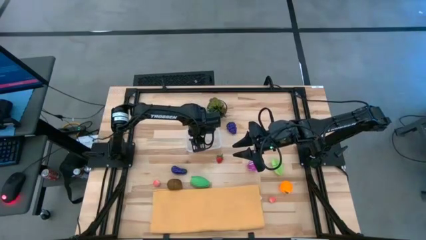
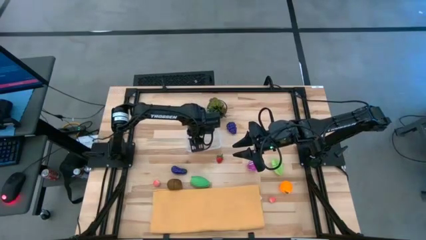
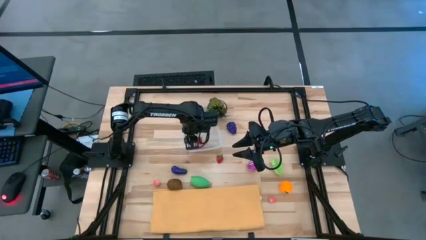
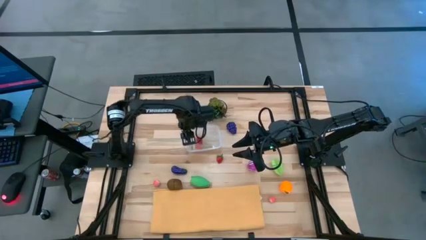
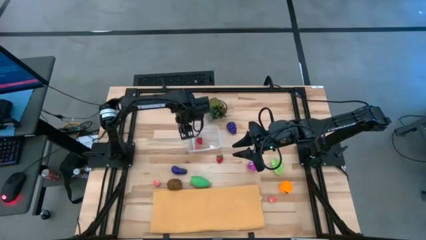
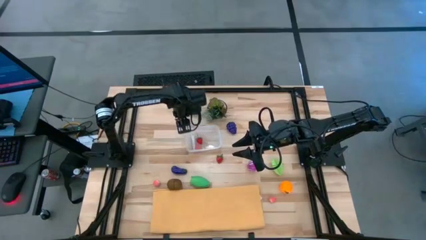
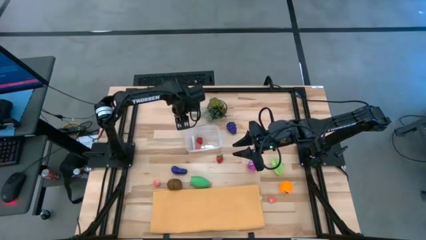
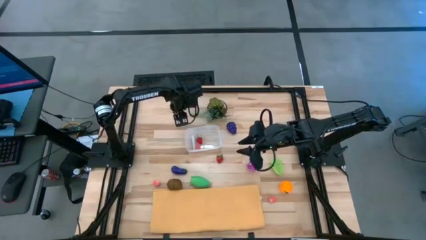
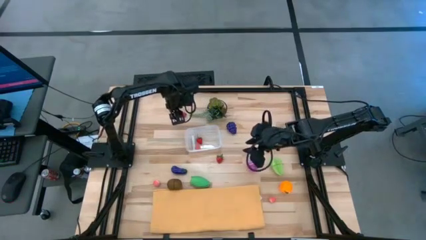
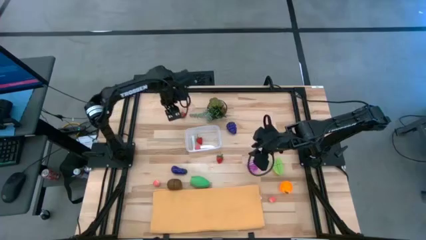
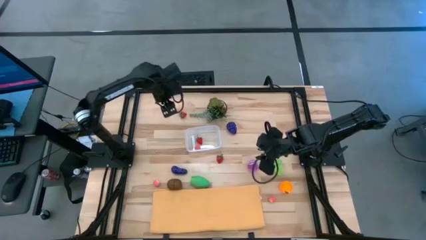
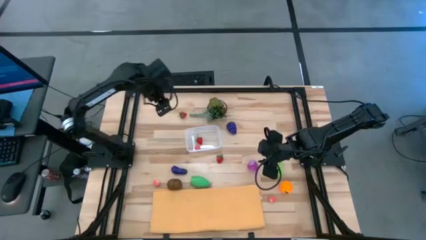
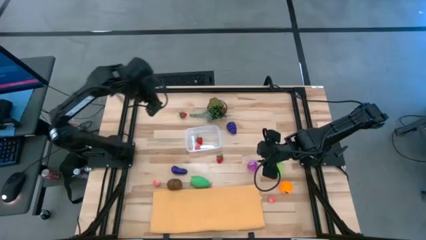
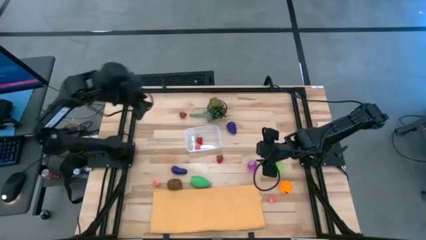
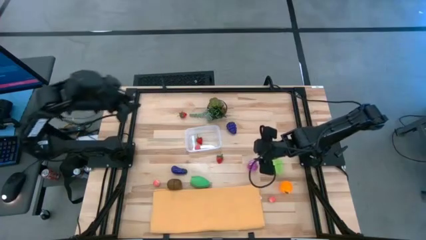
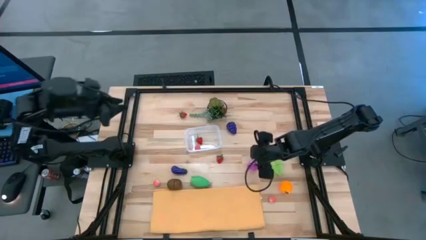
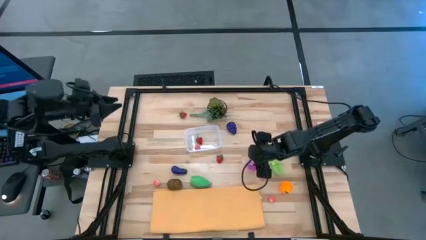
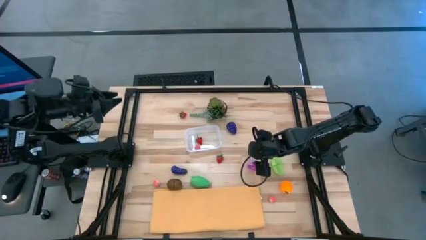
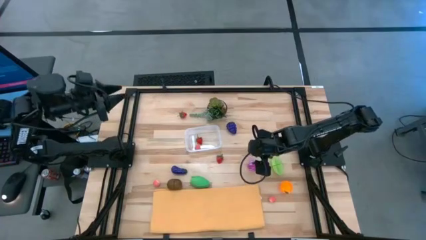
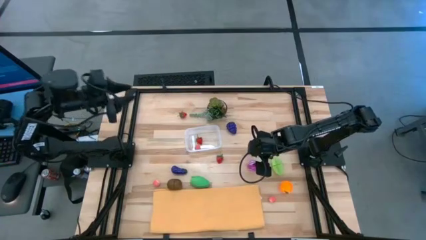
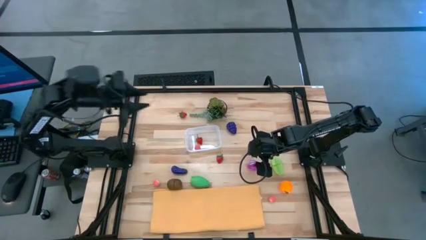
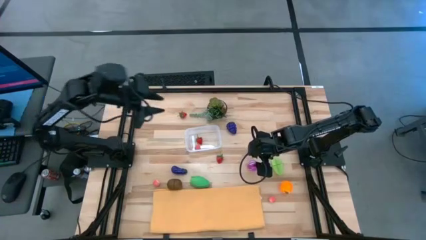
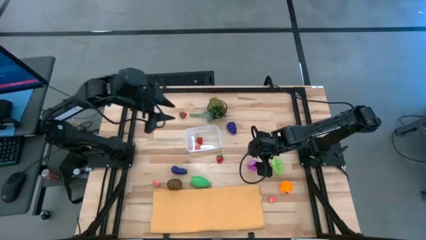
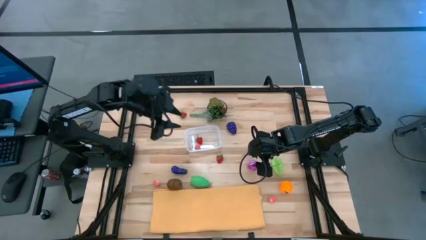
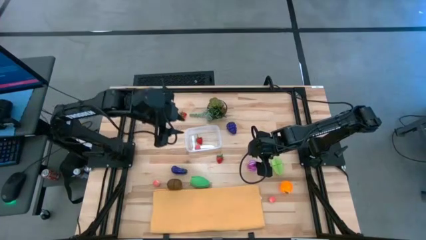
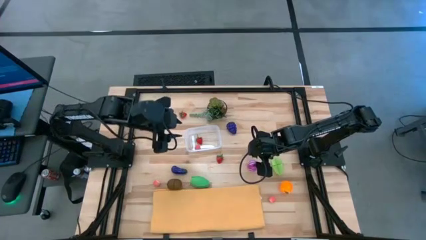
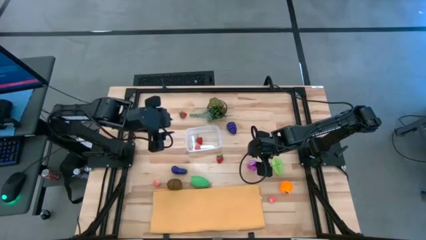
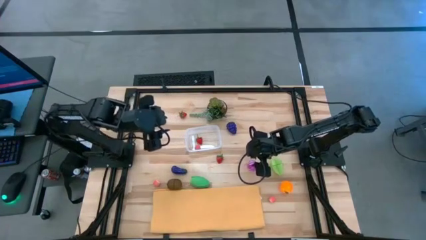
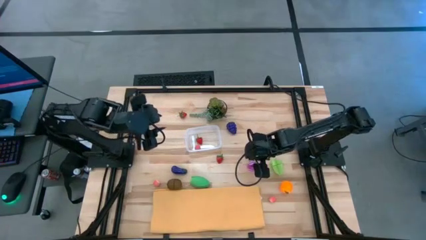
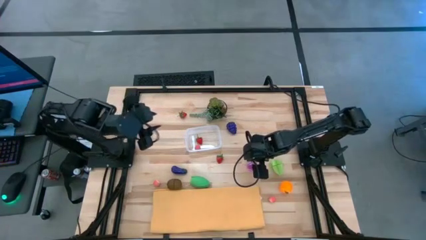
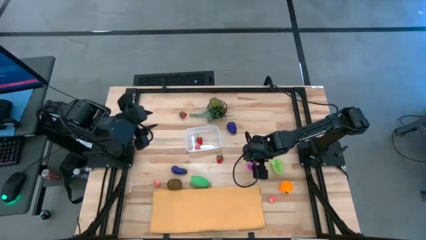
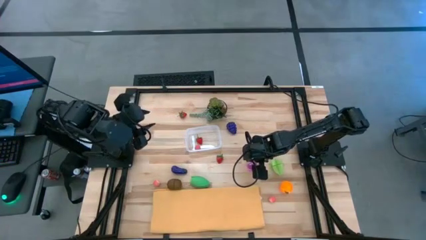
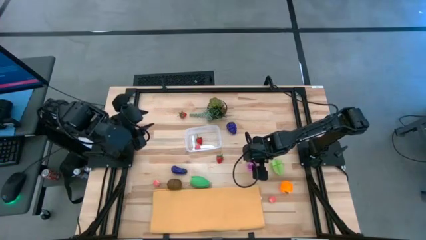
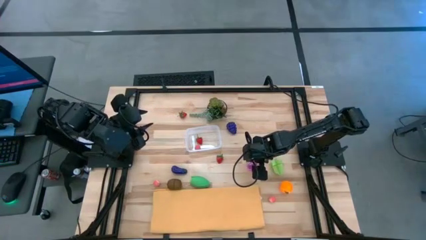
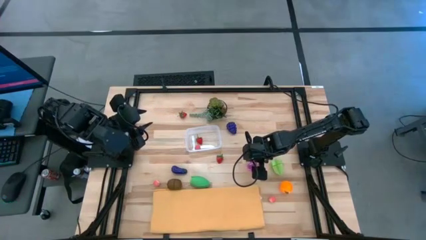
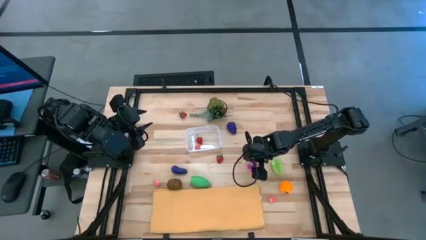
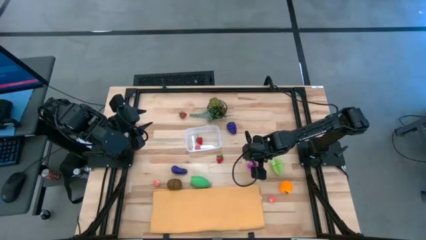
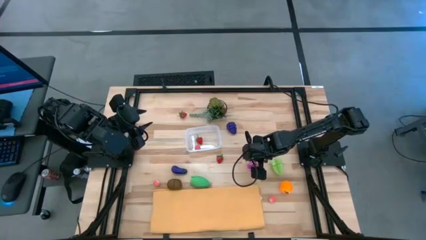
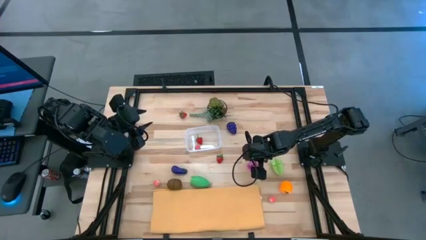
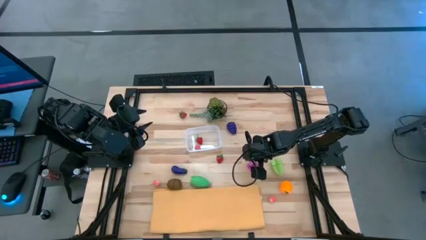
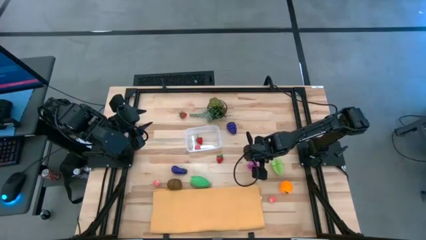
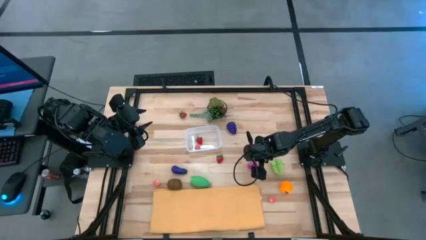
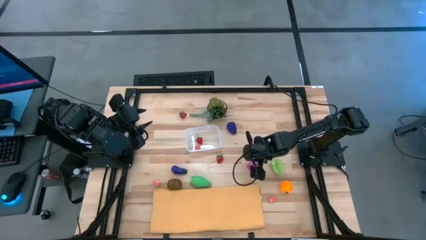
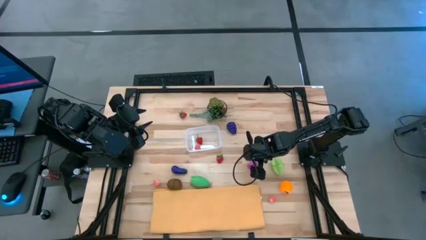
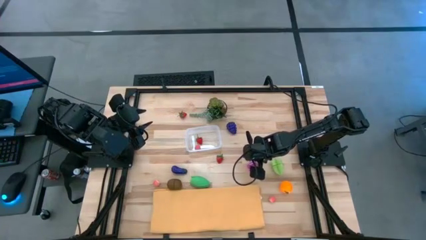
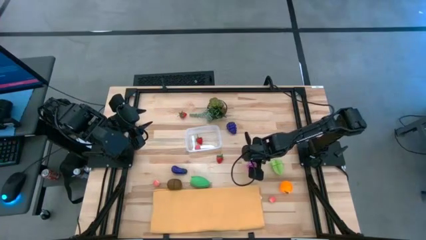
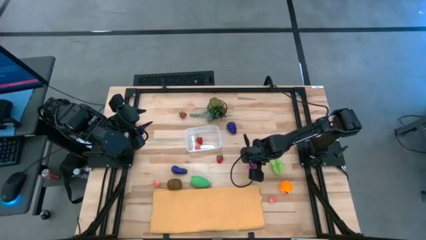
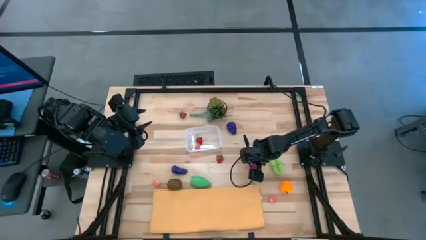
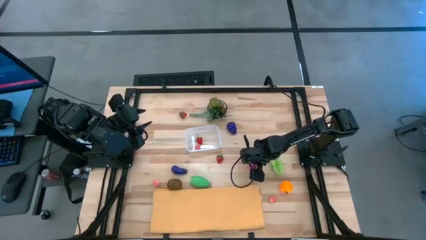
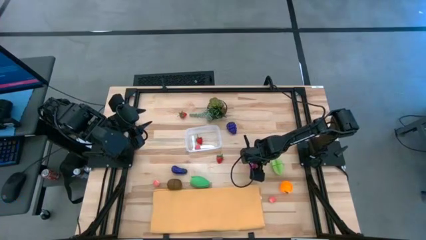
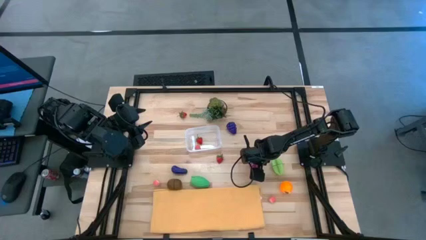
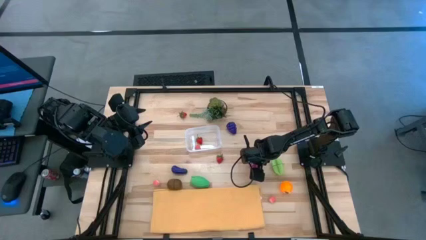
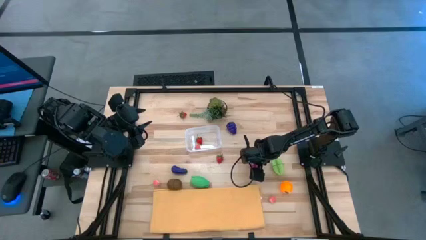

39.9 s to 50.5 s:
Task: Pick and placing Produce into tupperware
Put the purple onion into the transparent bin

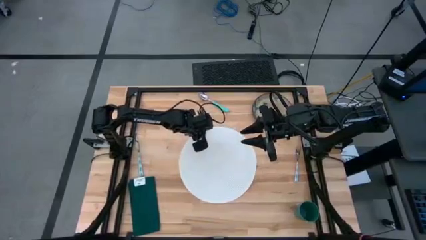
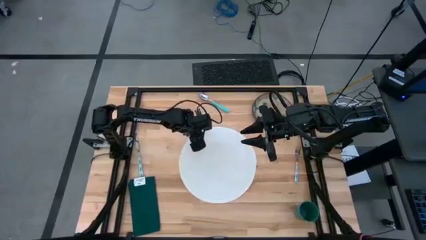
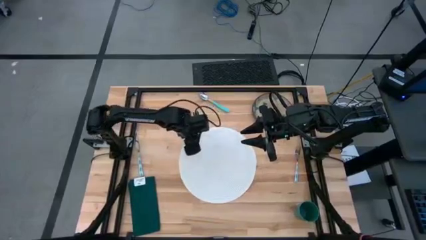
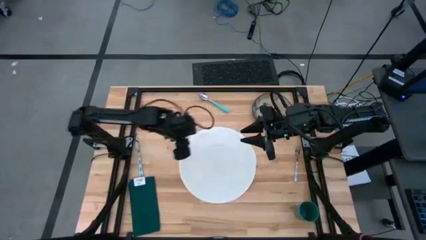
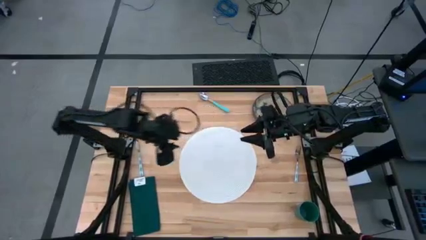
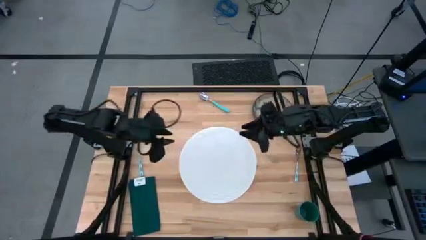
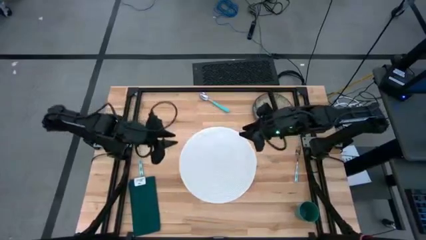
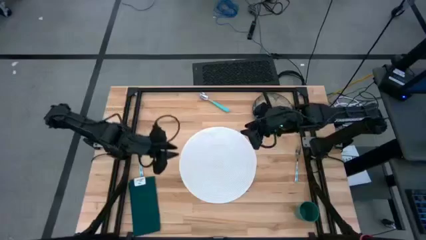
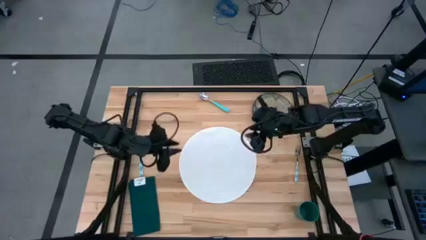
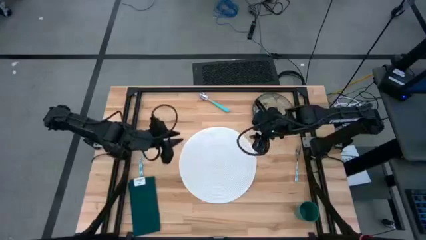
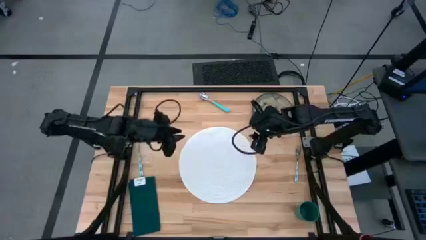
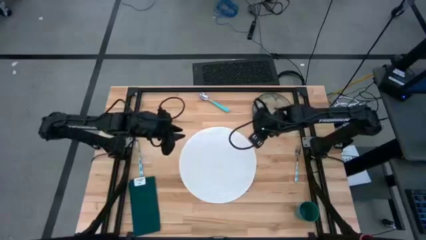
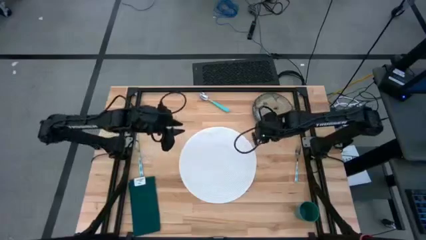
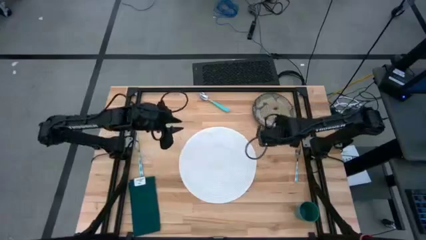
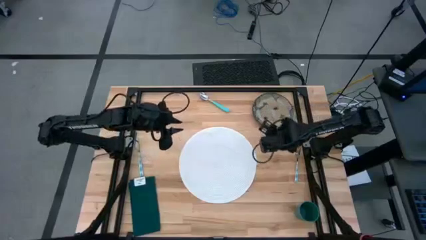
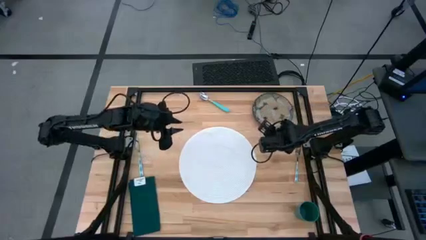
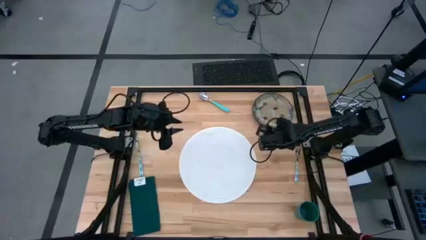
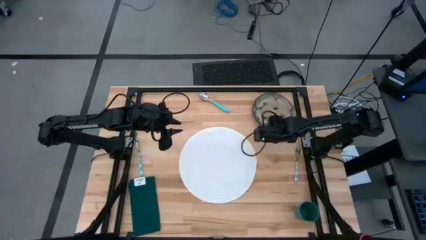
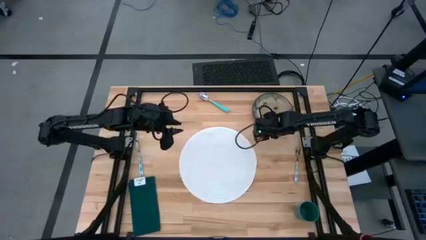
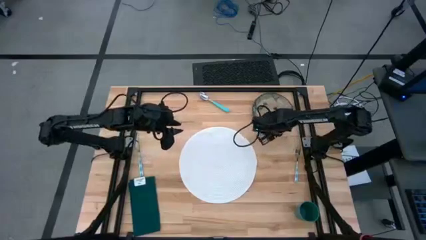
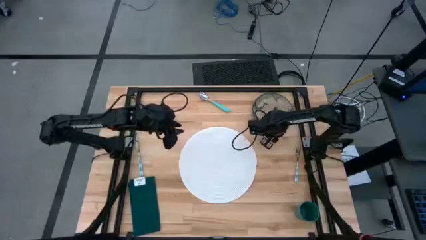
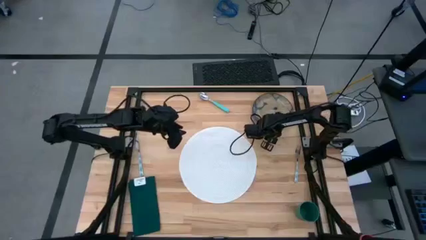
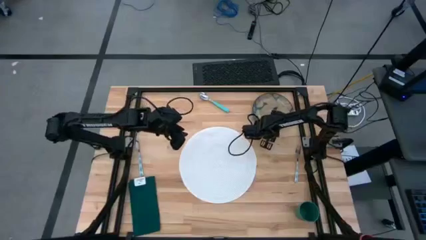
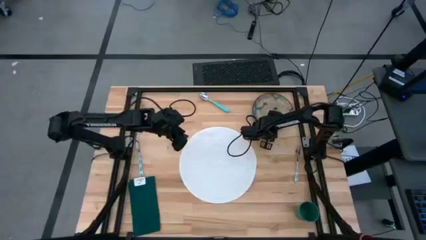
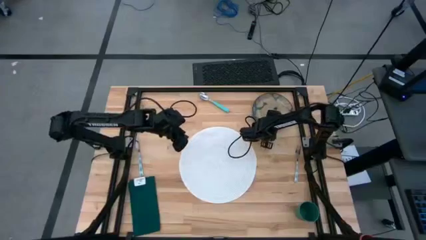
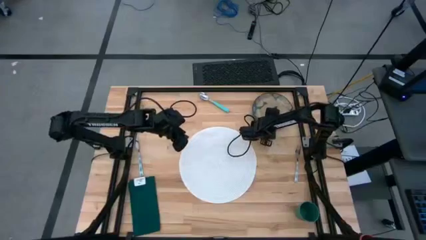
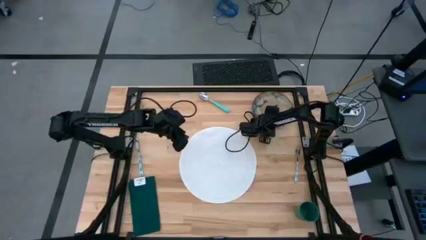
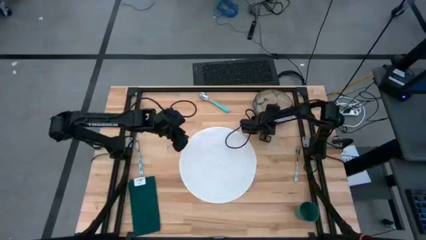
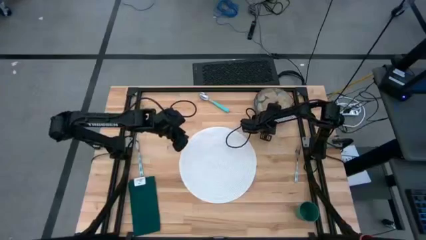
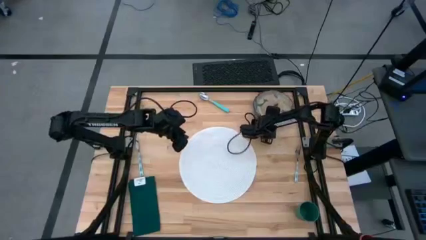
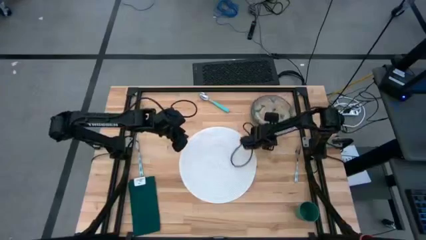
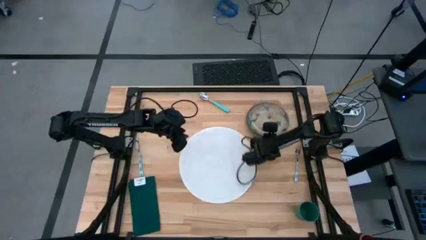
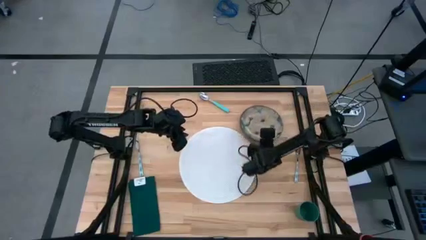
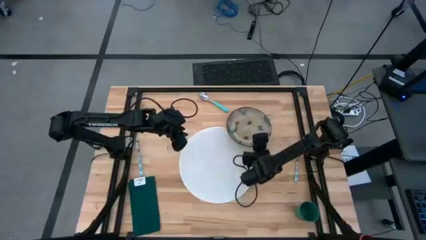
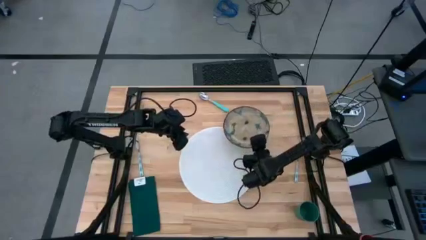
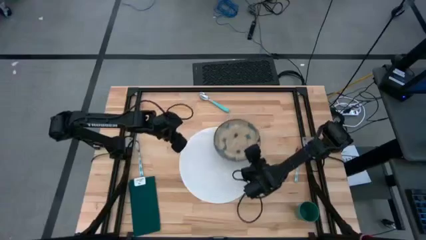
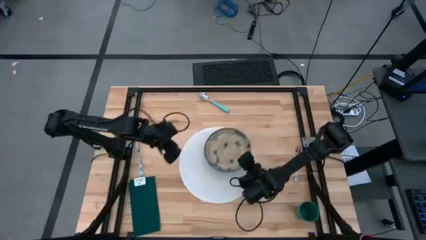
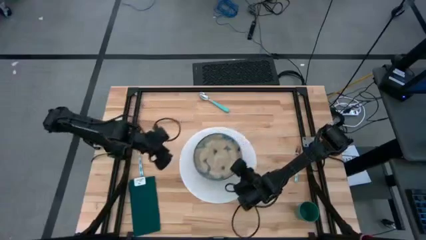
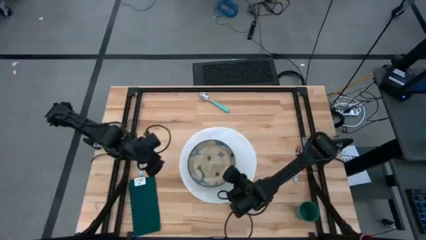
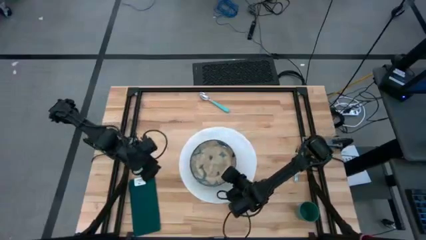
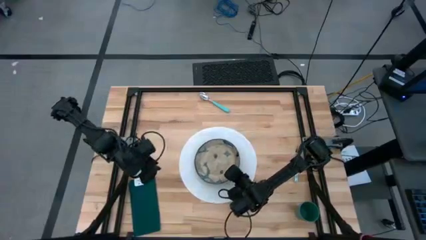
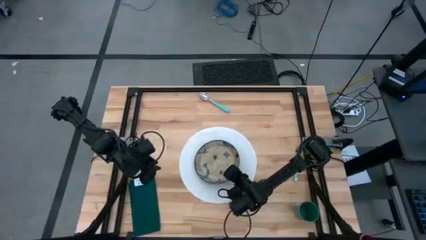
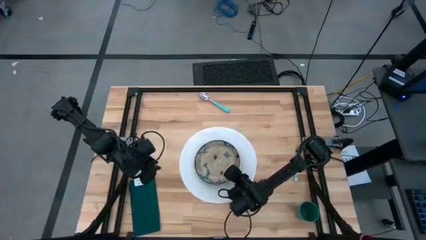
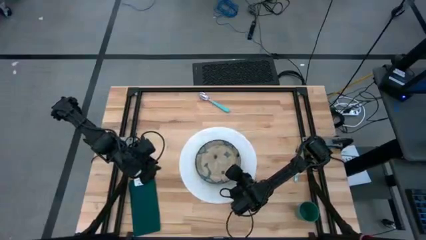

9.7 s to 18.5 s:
Task: Set table place
Put the brown patterned plate on the white table mat
